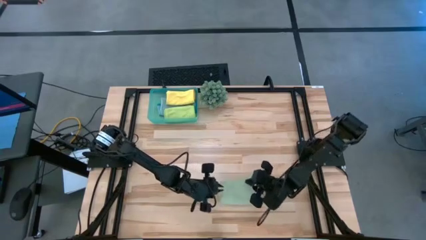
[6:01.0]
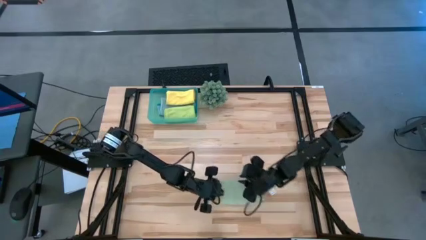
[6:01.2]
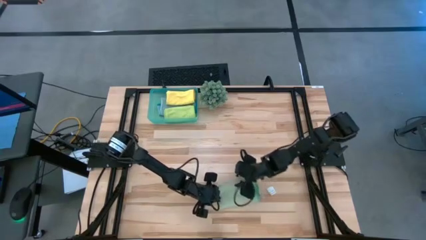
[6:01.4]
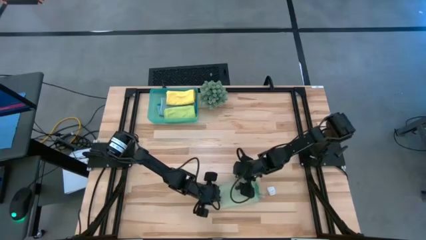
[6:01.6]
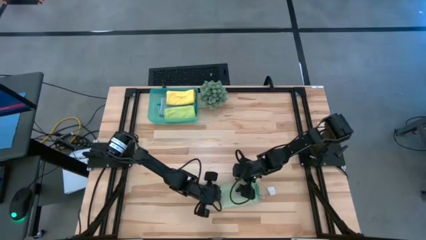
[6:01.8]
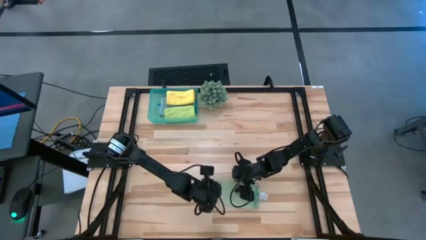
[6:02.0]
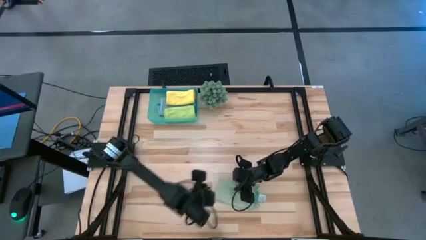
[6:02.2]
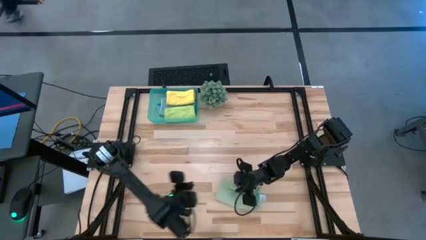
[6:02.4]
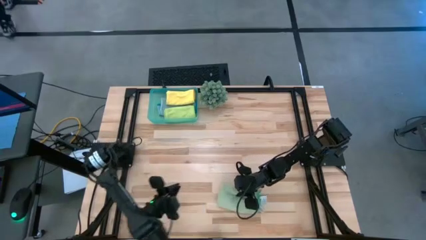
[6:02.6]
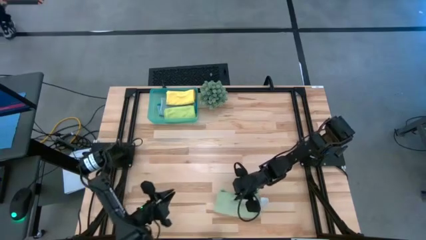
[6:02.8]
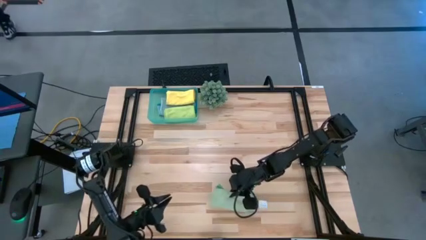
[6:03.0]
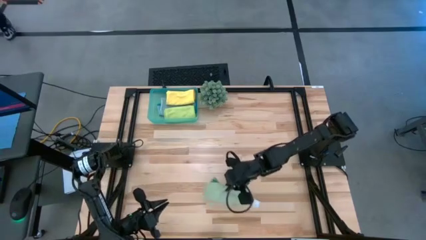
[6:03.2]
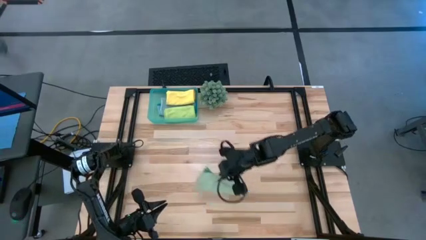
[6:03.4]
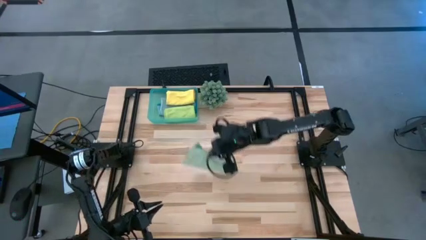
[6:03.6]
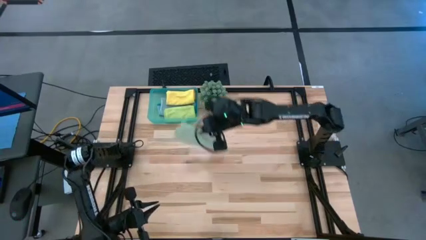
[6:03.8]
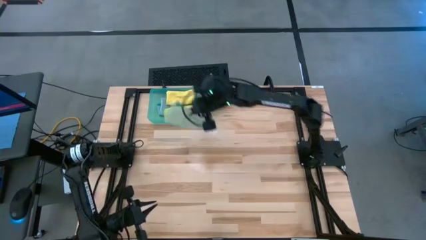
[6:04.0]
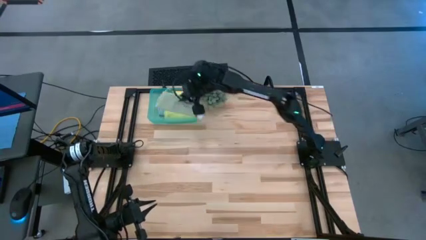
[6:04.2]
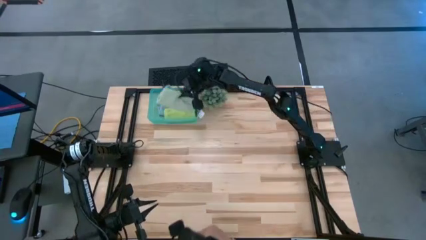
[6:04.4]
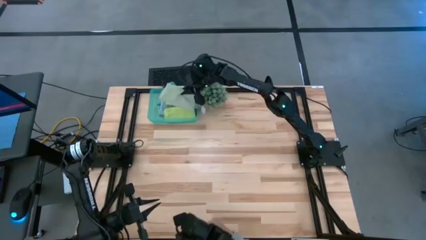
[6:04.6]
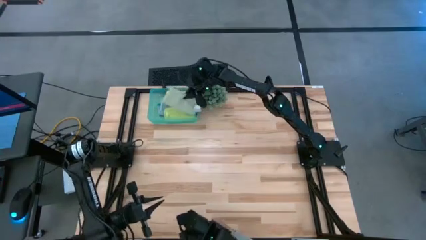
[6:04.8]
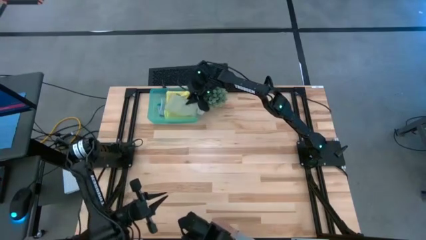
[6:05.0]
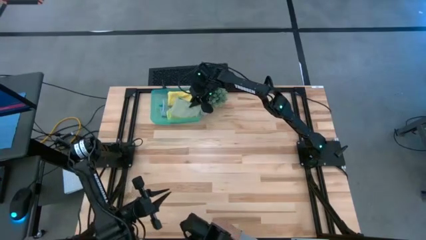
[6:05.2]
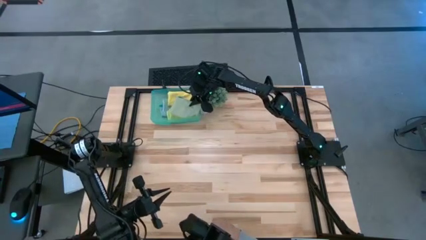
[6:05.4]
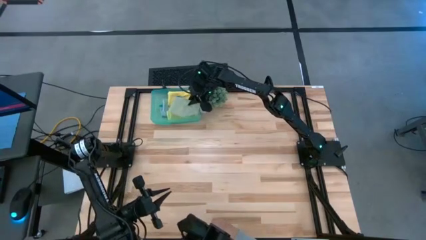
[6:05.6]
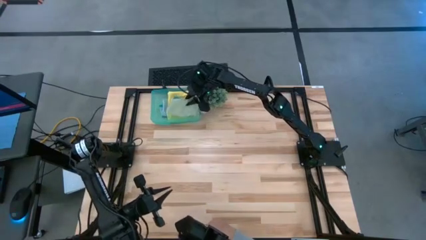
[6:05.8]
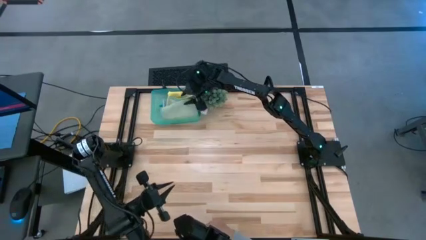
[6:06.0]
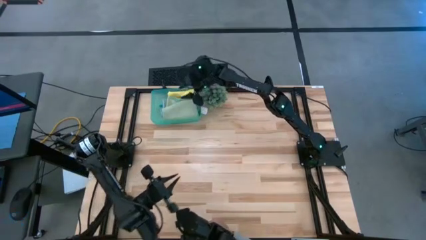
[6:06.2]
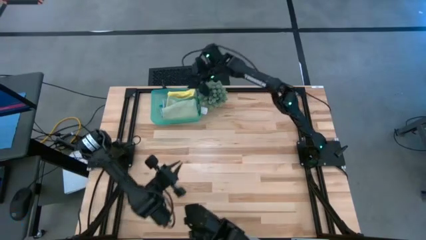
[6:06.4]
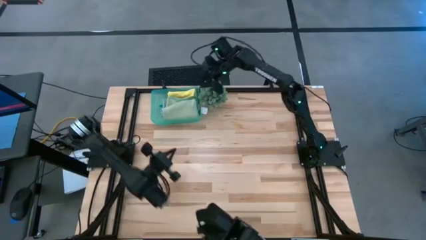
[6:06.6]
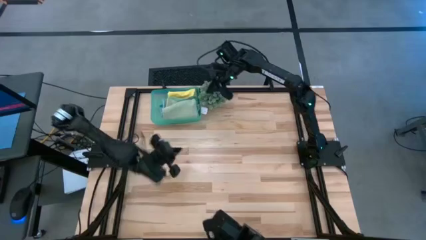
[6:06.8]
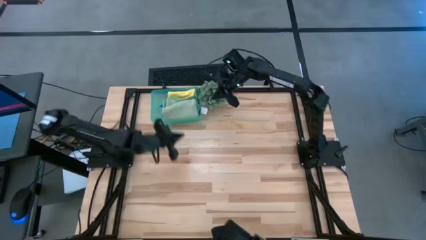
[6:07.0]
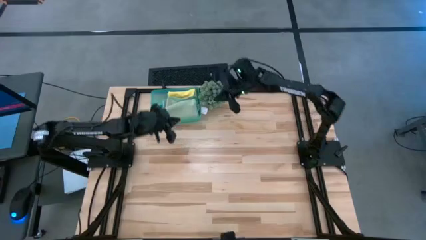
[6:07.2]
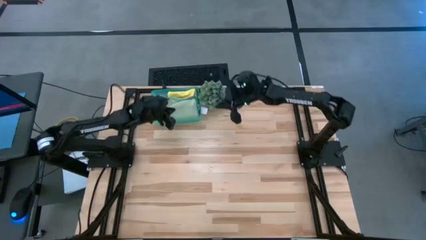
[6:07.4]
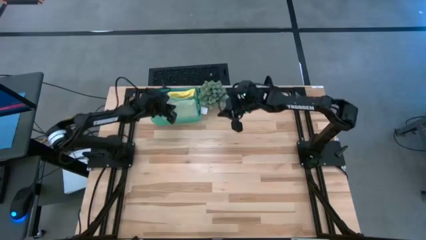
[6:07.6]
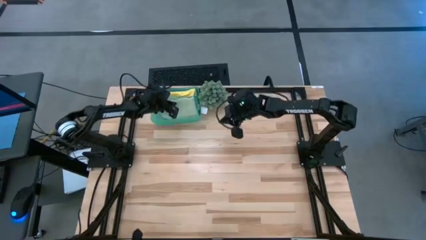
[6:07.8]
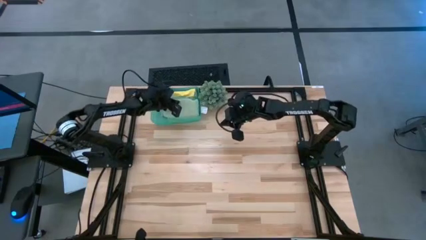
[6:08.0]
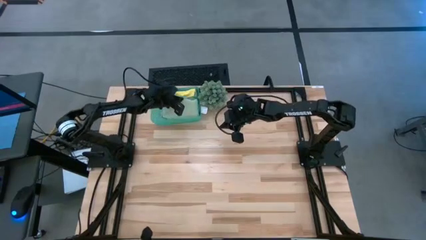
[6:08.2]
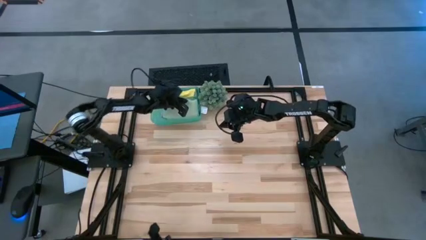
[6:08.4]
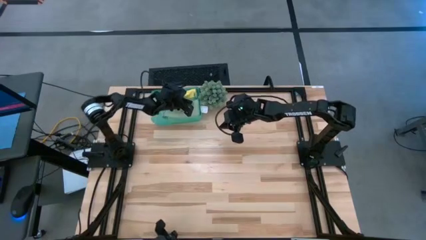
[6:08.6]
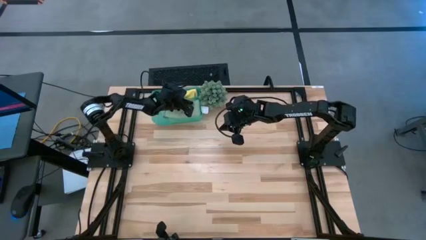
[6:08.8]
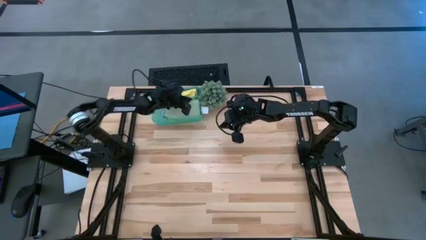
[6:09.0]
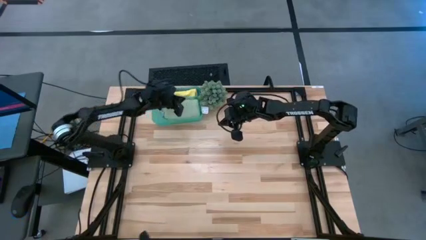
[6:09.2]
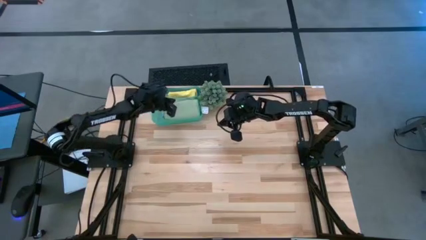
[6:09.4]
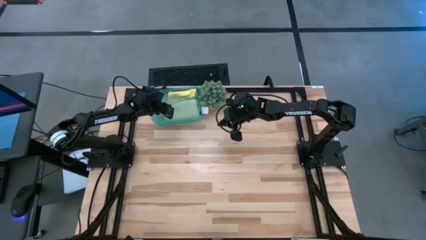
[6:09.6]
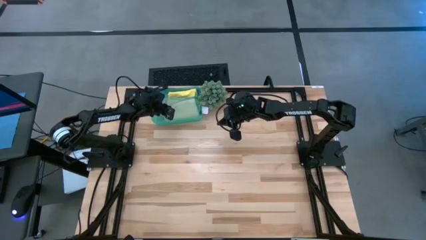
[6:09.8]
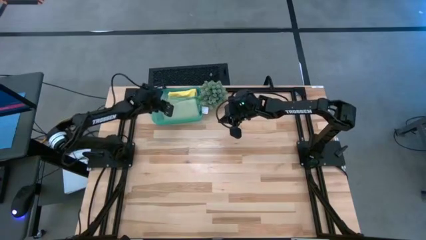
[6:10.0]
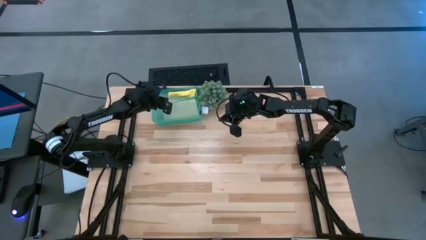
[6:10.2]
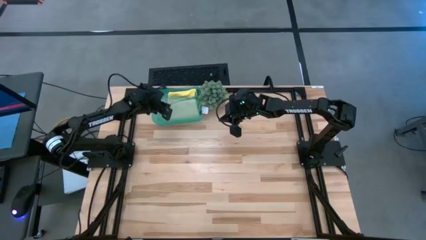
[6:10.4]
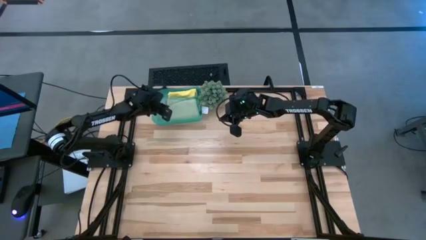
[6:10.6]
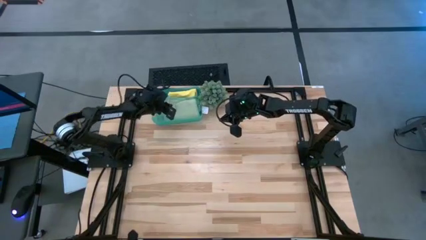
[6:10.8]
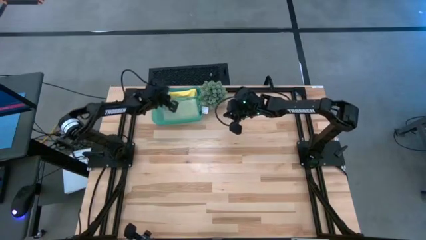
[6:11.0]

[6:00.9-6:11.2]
Task: Fold microfiber towels
Put the folded green microfiber cloth into the blue bin
